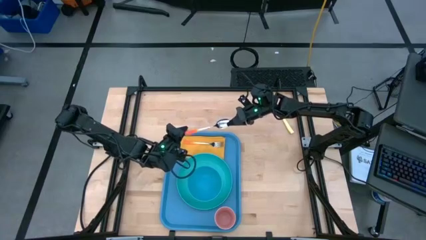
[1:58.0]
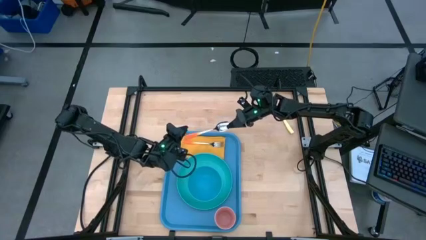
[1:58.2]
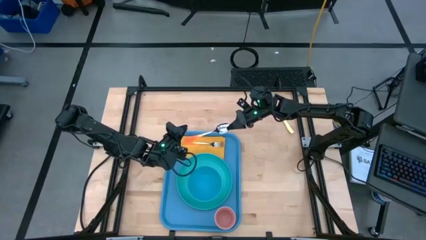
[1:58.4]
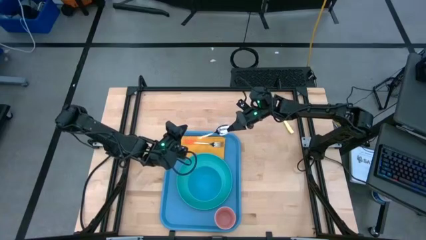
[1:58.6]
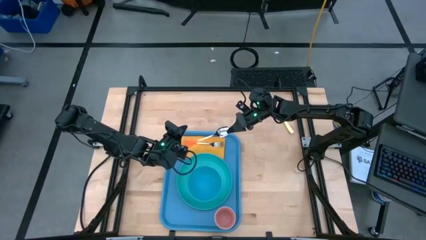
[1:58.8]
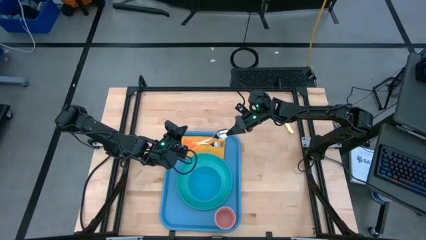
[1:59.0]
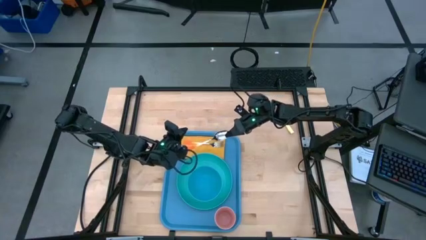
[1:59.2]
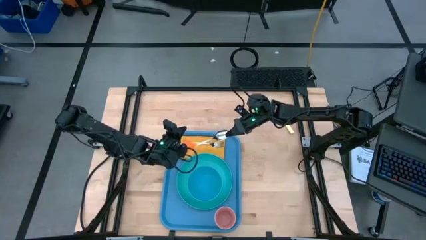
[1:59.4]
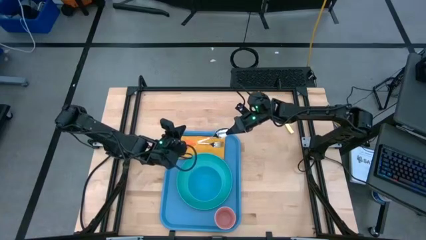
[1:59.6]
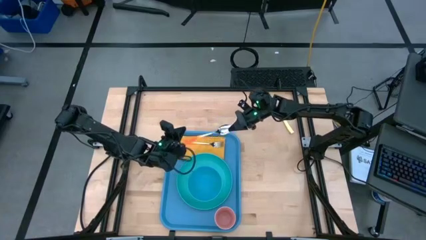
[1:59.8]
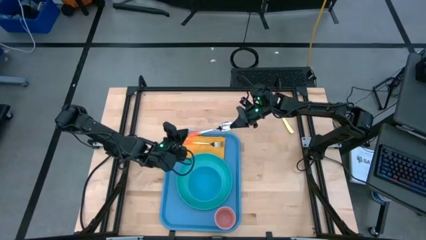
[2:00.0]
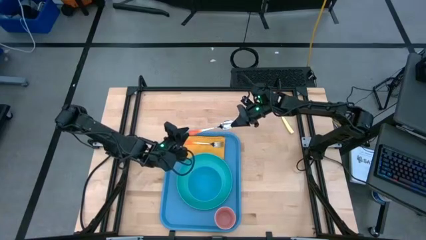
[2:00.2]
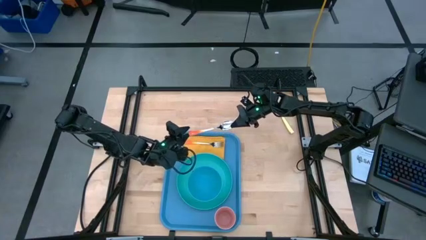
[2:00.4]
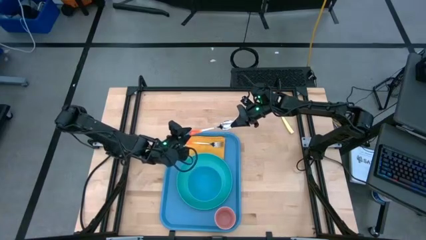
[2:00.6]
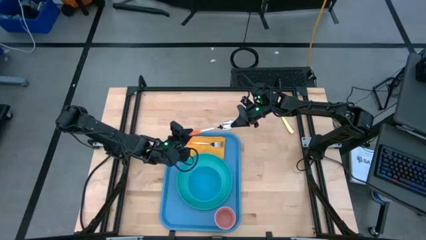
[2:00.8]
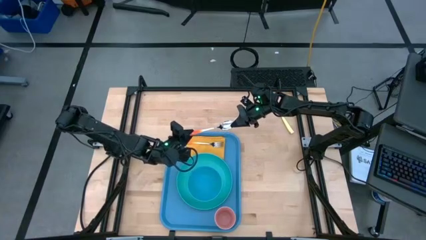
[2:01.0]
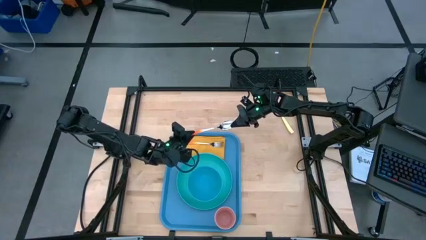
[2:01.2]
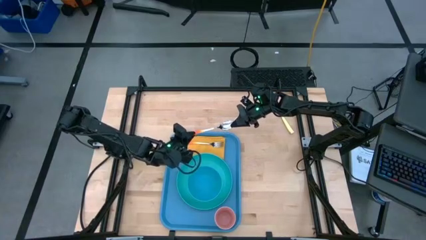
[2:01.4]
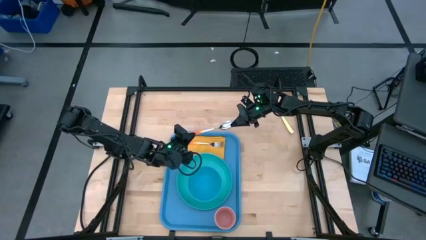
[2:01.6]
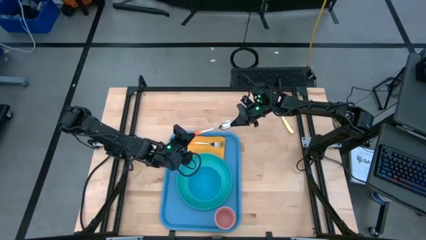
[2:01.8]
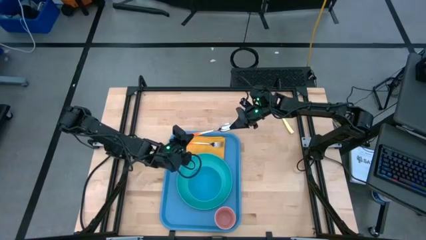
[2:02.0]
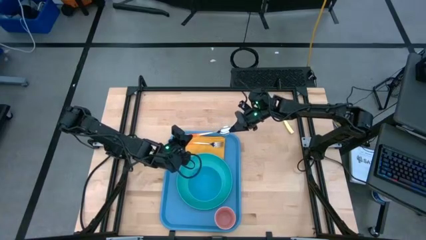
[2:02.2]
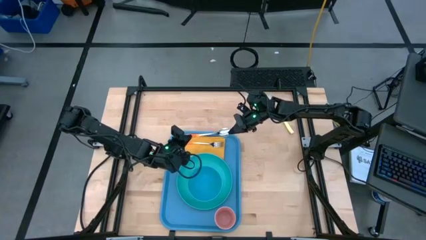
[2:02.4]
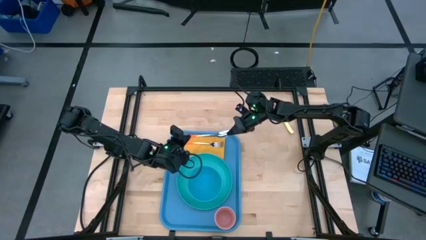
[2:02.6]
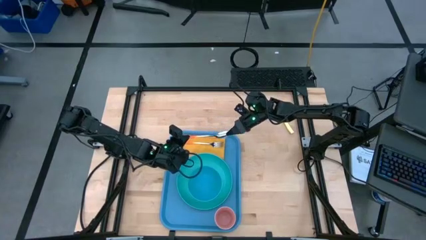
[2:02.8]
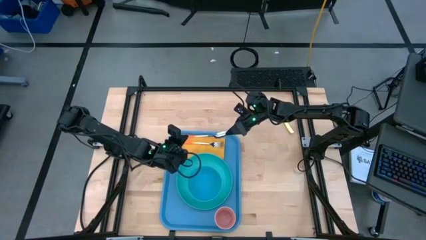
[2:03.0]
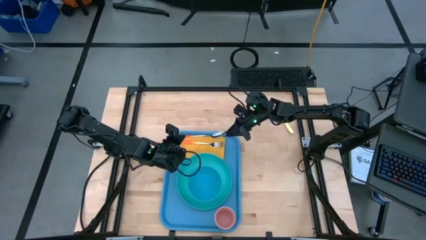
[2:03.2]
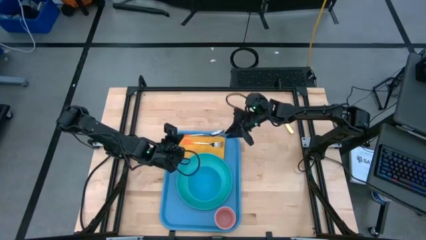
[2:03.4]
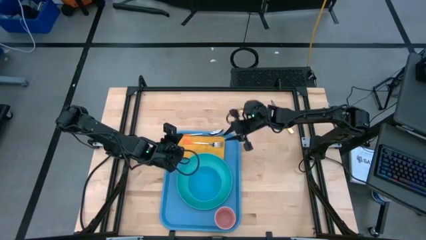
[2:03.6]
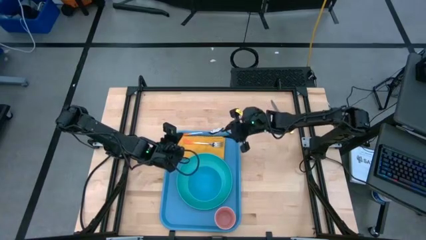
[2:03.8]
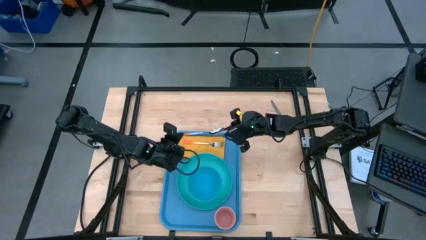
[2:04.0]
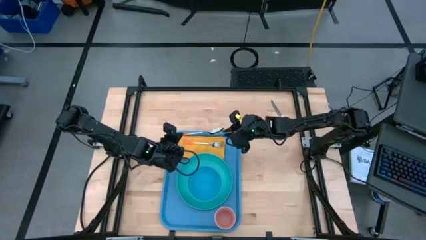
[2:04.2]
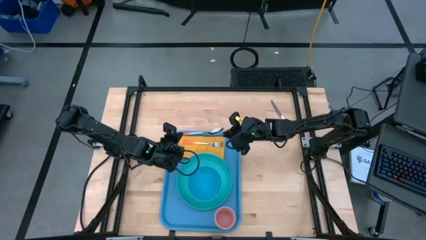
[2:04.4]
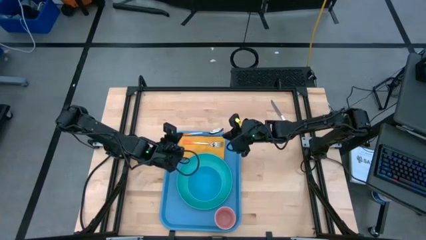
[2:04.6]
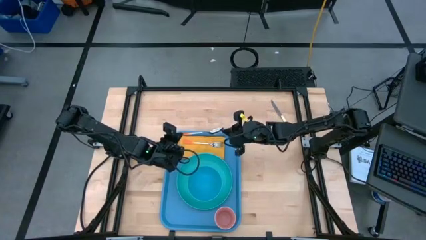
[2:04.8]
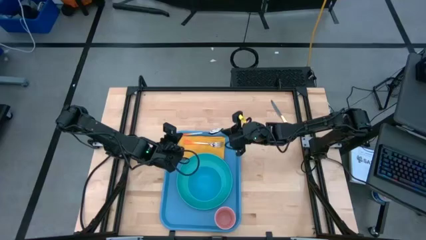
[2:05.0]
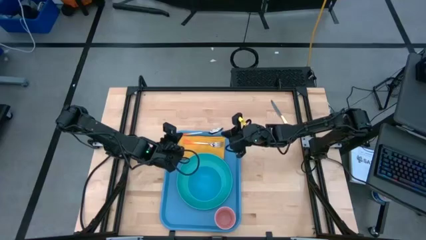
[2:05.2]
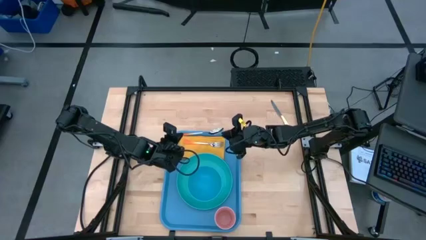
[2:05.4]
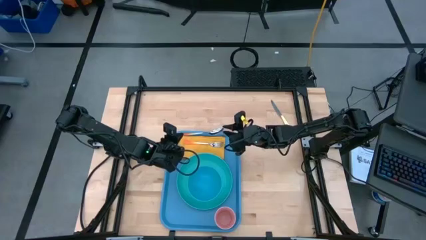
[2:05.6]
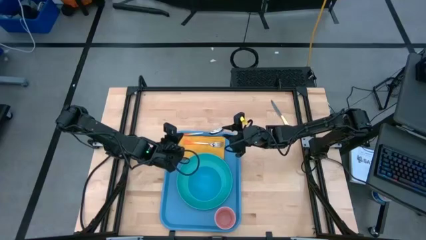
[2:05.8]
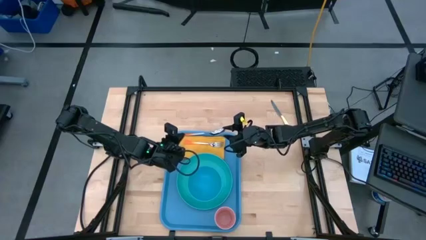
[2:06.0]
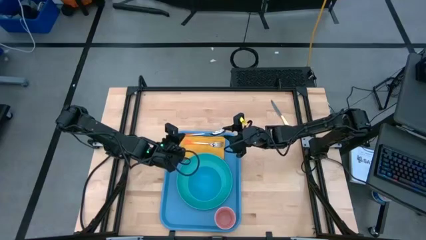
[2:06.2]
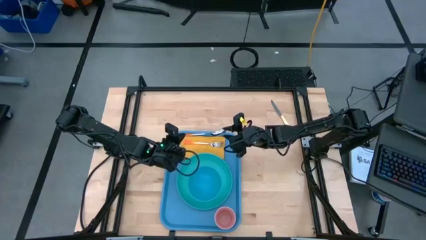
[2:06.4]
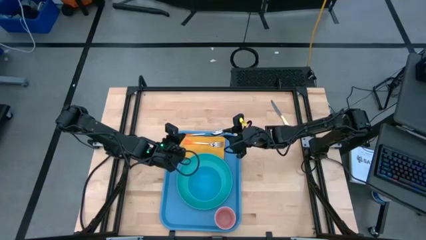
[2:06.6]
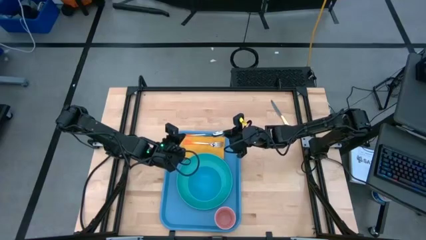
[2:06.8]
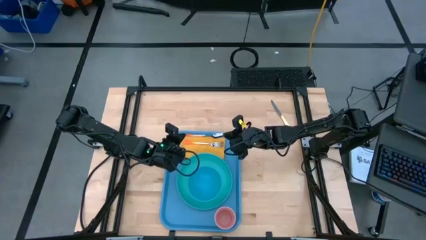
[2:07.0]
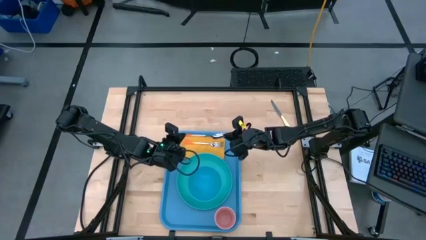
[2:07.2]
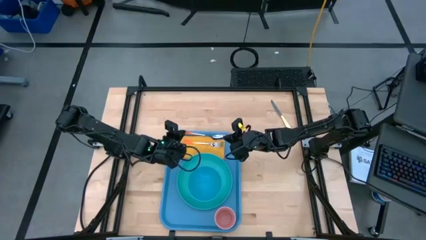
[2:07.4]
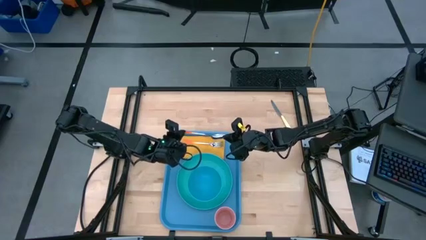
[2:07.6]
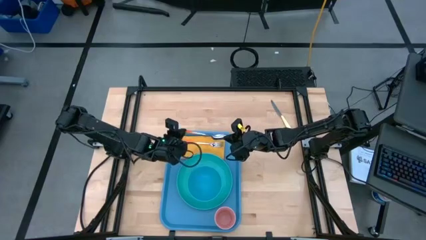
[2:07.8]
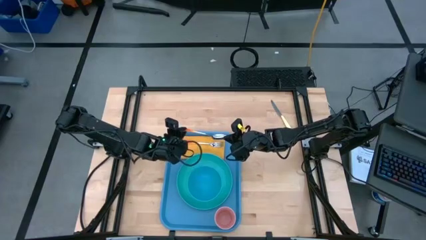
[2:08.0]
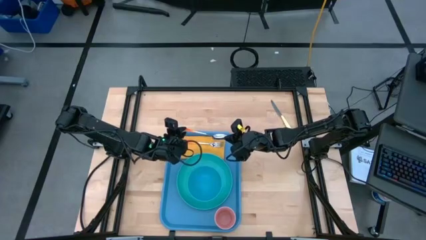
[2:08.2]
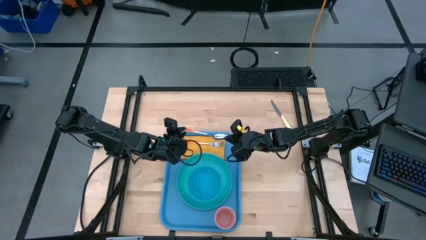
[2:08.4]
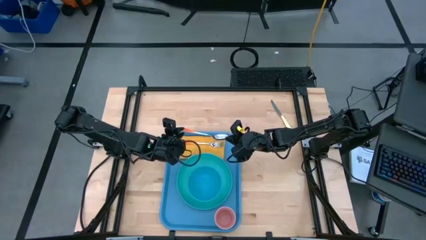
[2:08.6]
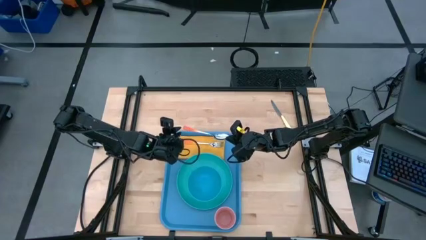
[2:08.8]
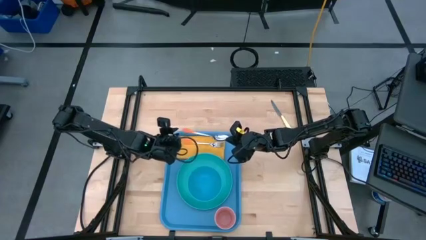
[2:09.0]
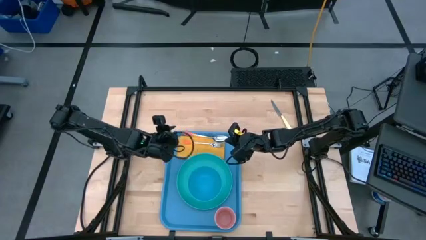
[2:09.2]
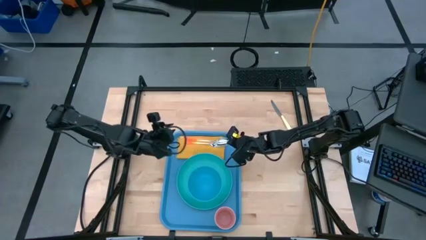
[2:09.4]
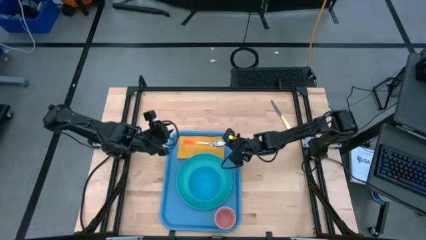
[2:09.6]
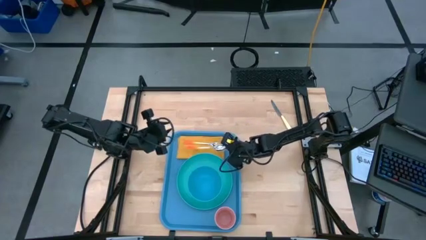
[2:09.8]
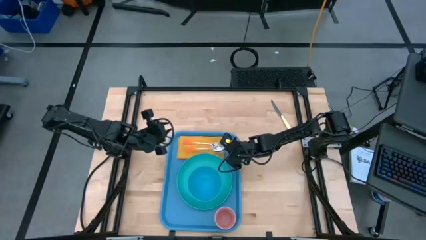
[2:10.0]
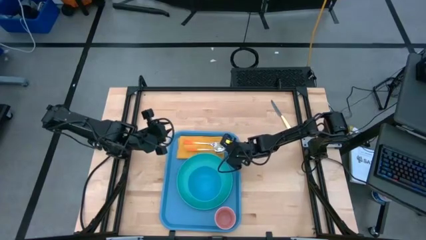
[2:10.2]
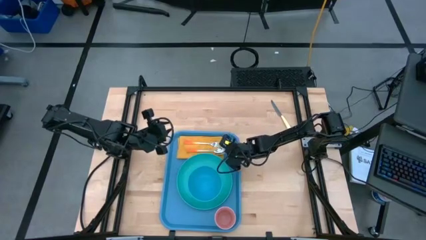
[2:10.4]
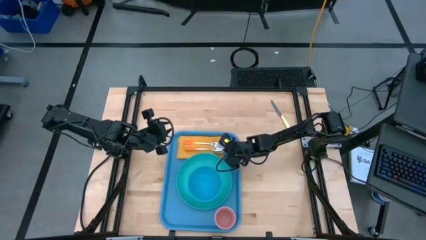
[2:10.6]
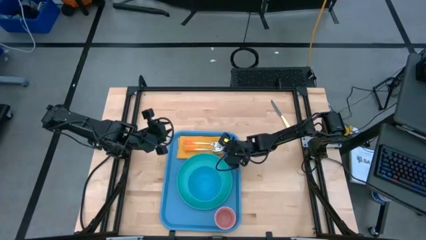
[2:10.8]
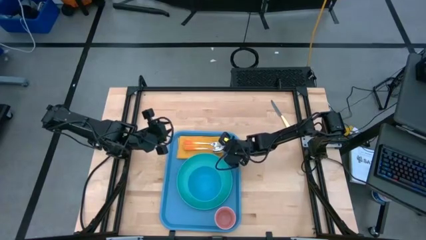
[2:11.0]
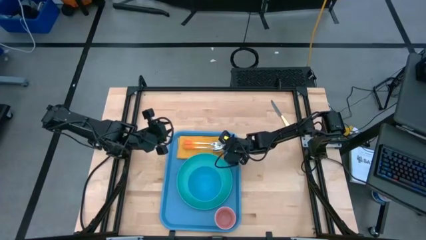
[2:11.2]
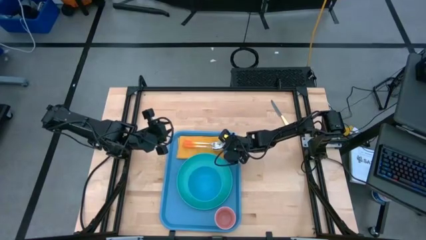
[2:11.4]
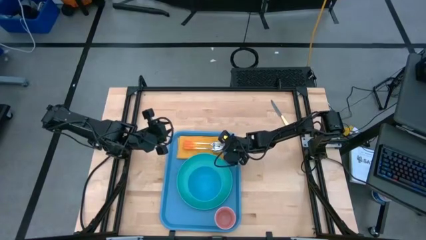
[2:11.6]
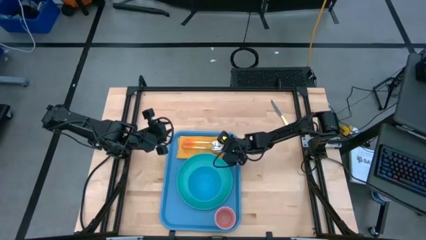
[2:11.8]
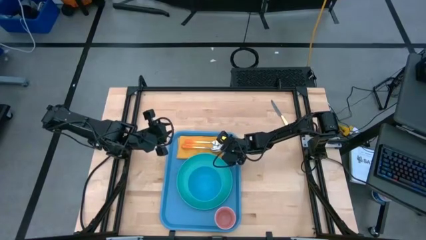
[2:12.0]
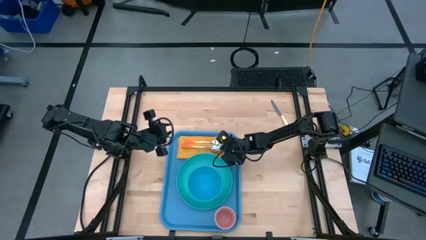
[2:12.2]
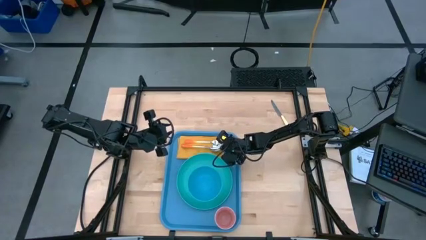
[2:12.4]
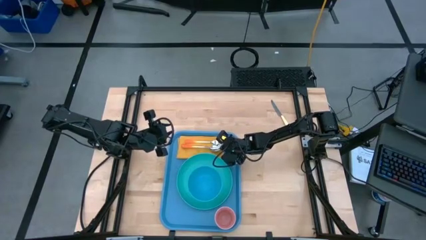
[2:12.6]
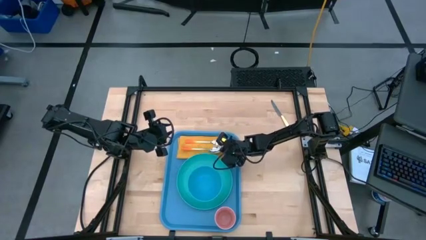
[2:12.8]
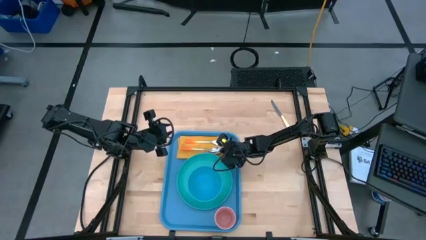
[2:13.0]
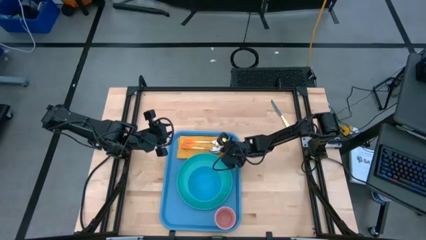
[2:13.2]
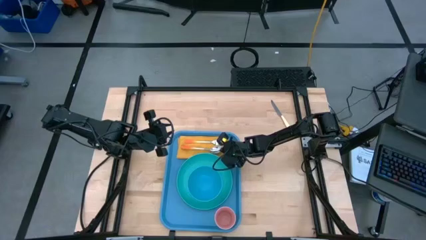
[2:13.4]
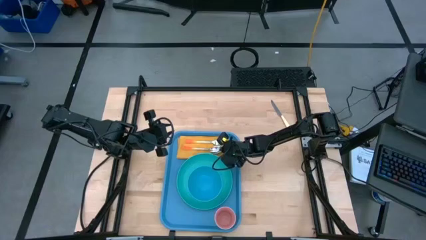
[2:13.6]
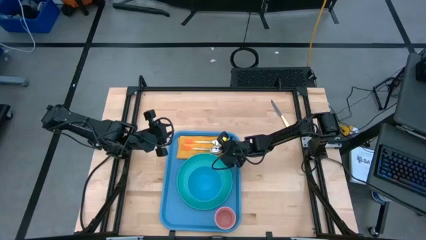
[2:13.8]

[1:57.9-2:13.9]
Task: Set up tray
Put the orange spoon on top of the orange napkin to the bottom of the orange fork
